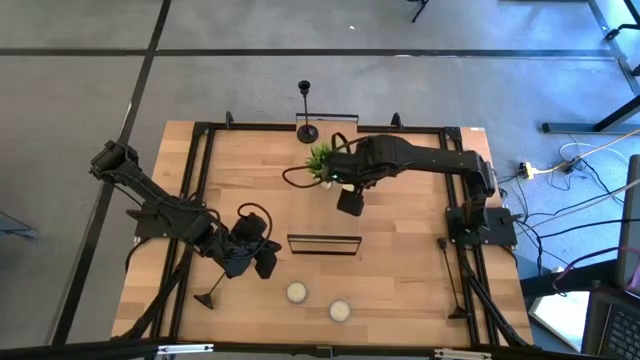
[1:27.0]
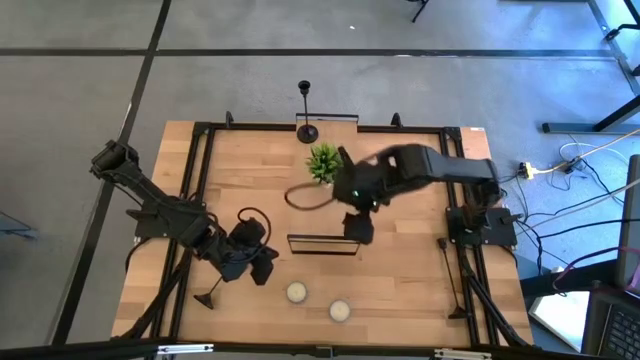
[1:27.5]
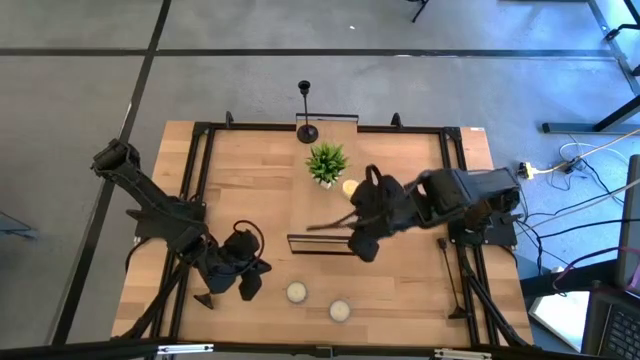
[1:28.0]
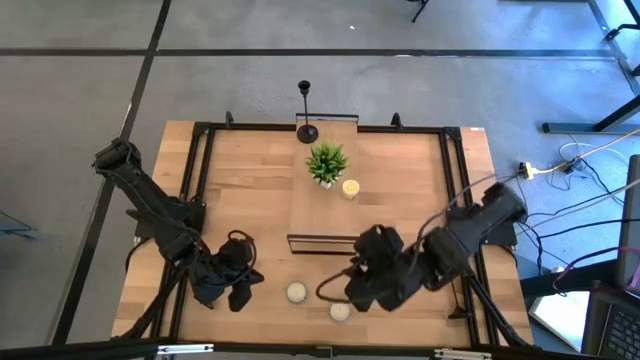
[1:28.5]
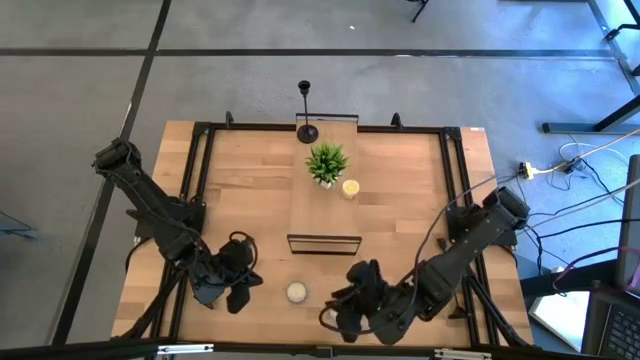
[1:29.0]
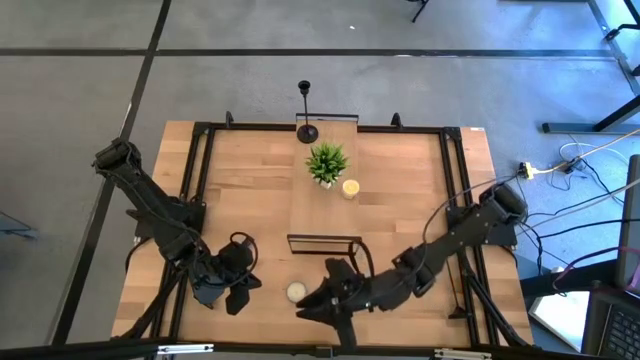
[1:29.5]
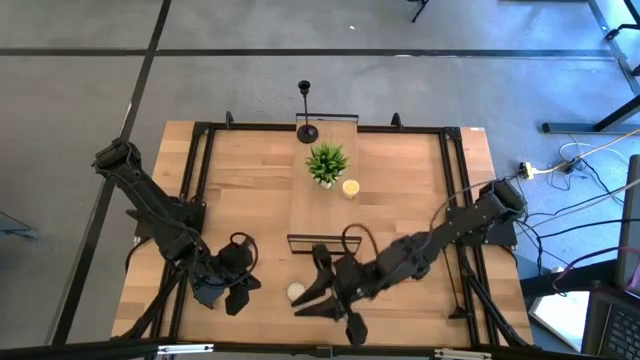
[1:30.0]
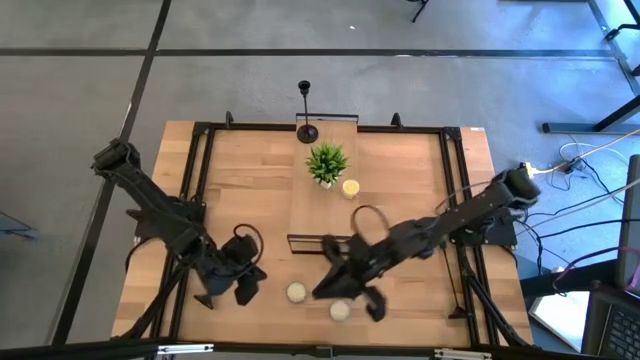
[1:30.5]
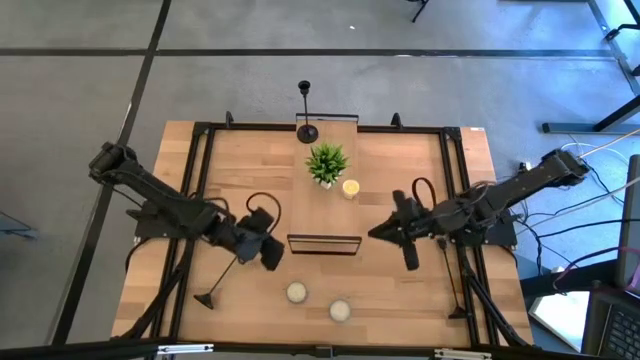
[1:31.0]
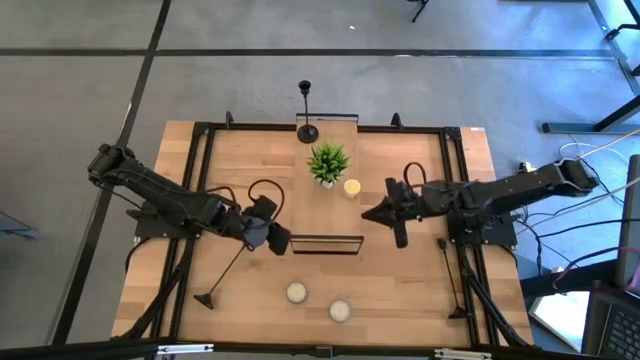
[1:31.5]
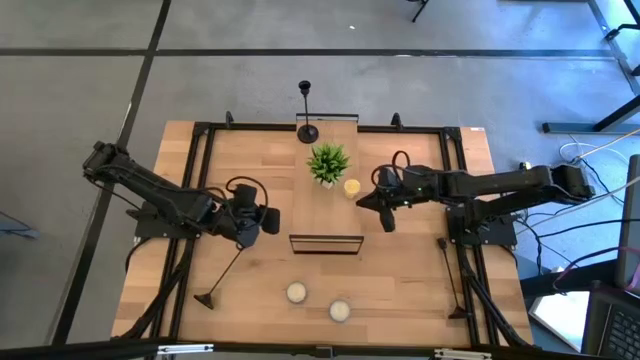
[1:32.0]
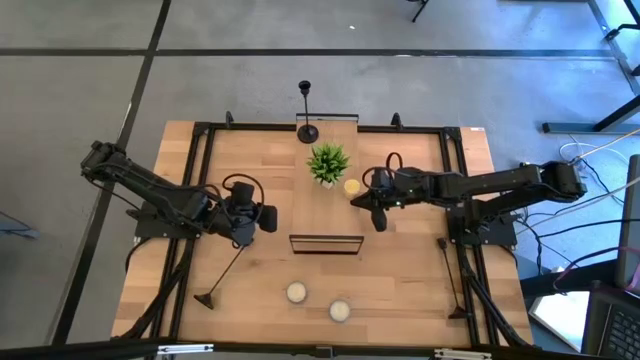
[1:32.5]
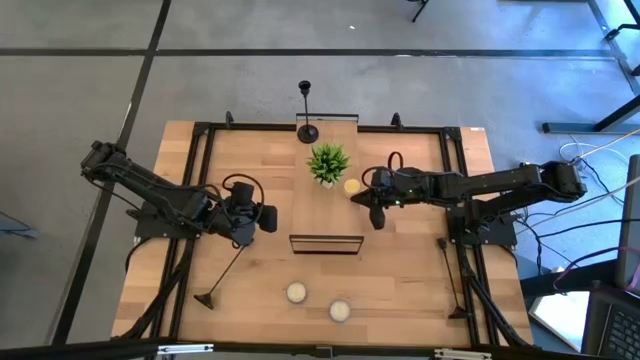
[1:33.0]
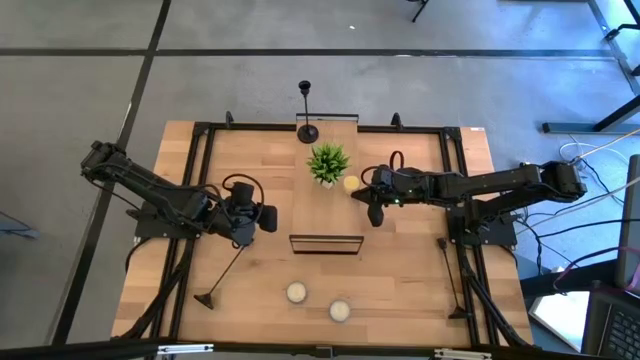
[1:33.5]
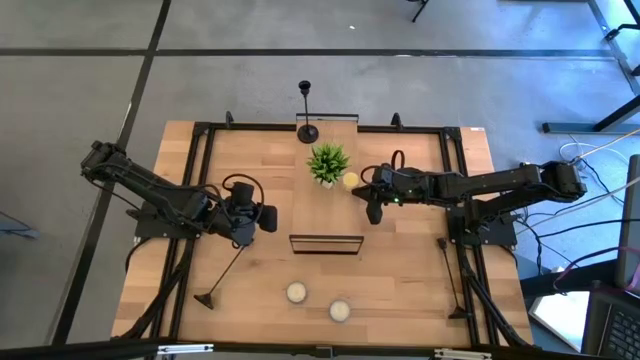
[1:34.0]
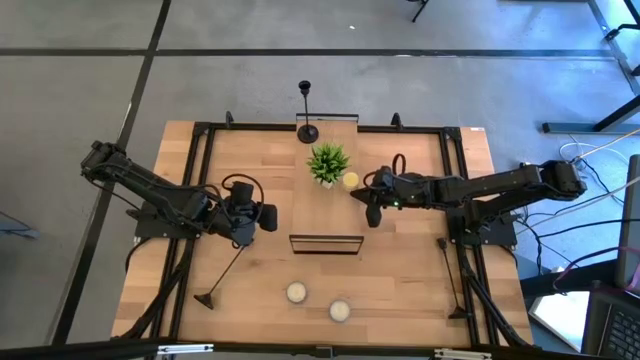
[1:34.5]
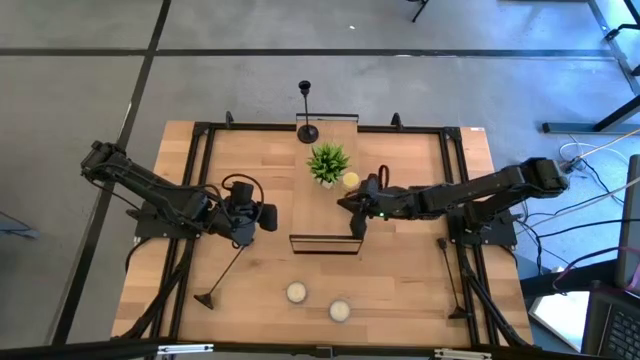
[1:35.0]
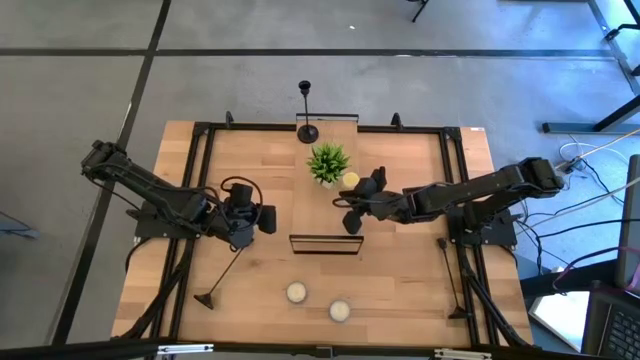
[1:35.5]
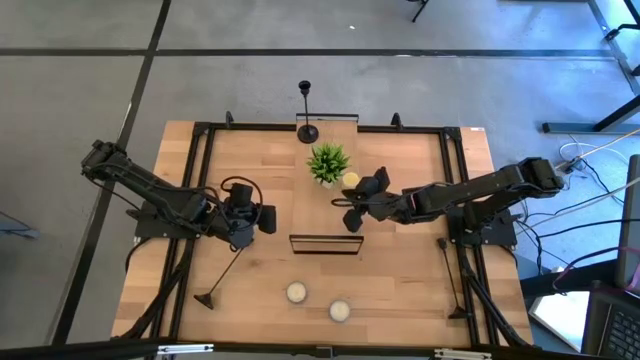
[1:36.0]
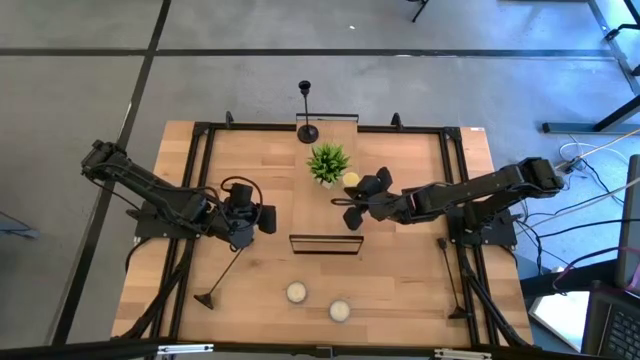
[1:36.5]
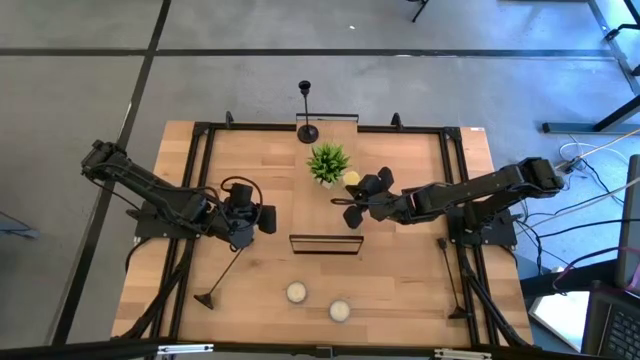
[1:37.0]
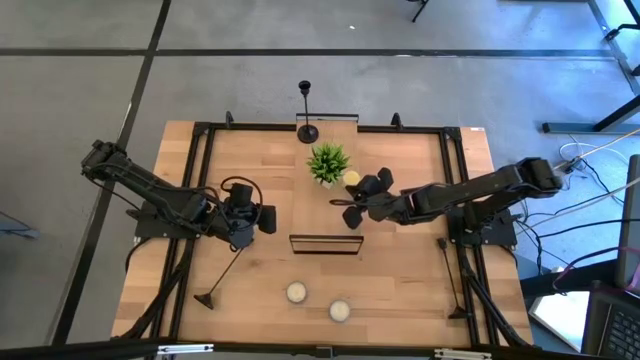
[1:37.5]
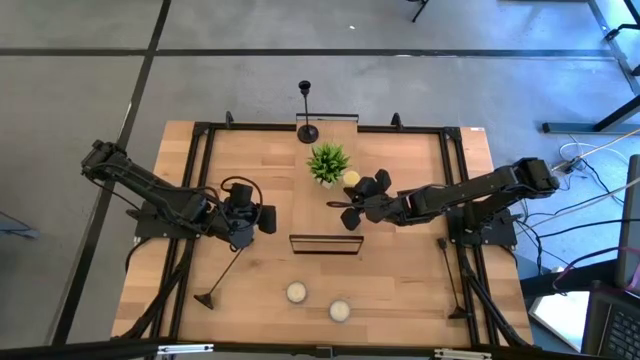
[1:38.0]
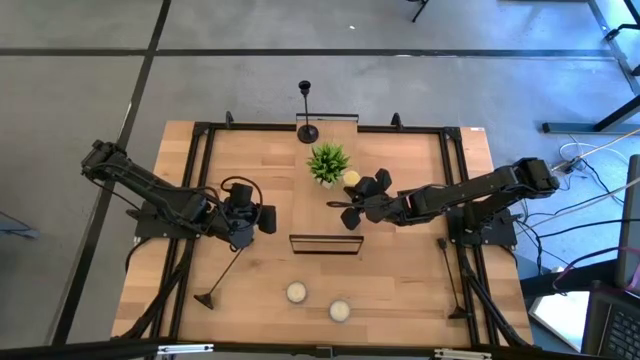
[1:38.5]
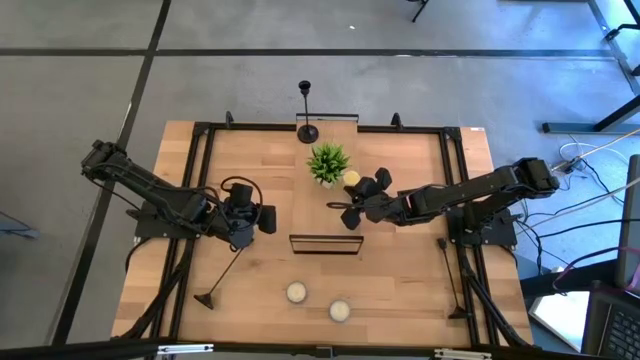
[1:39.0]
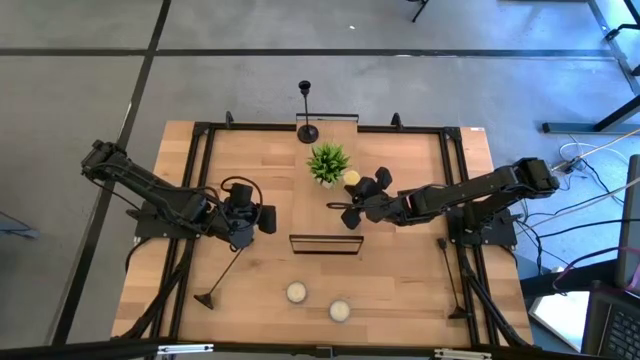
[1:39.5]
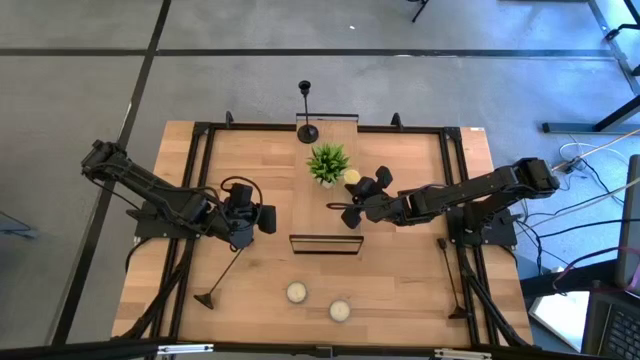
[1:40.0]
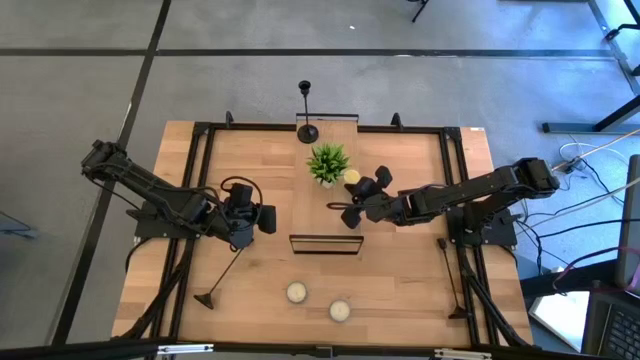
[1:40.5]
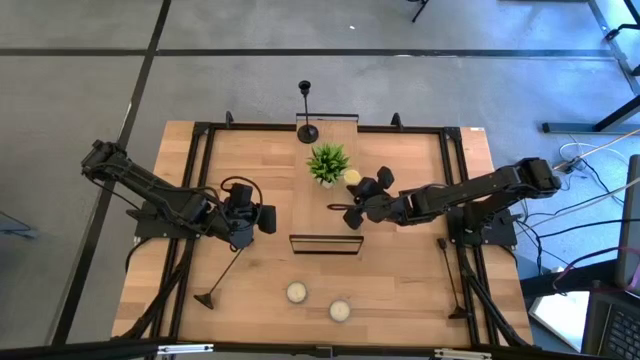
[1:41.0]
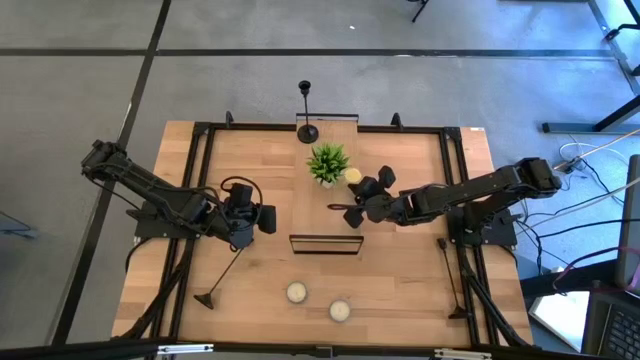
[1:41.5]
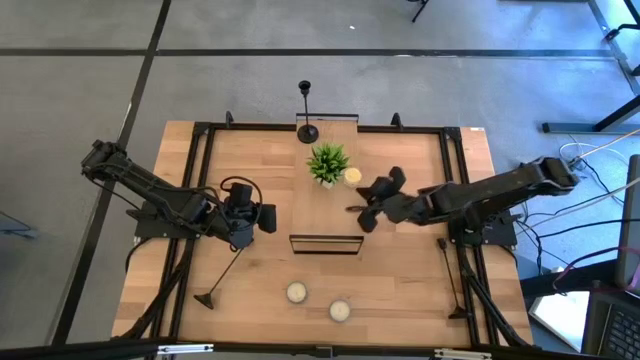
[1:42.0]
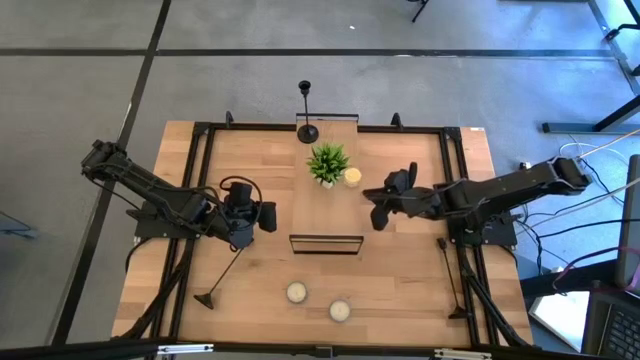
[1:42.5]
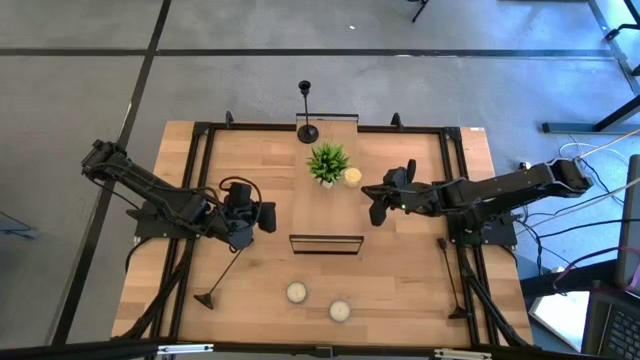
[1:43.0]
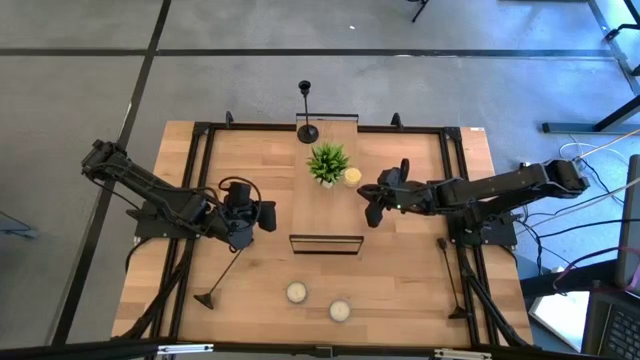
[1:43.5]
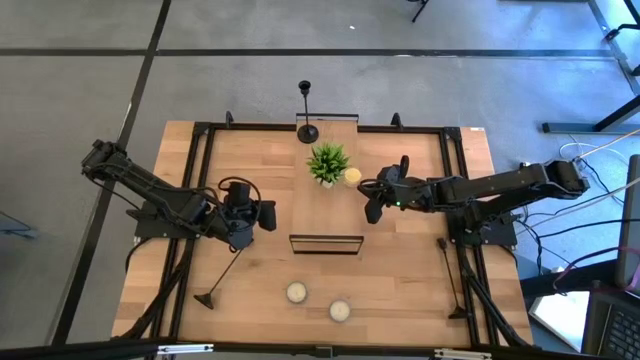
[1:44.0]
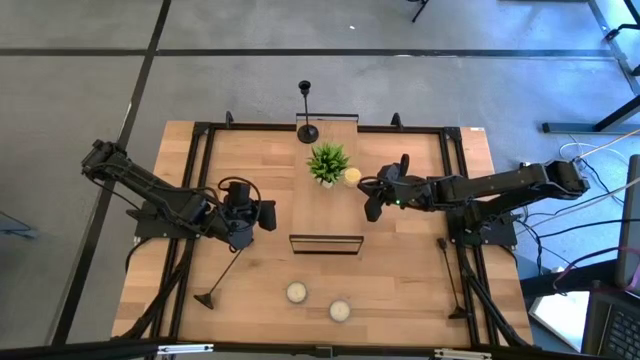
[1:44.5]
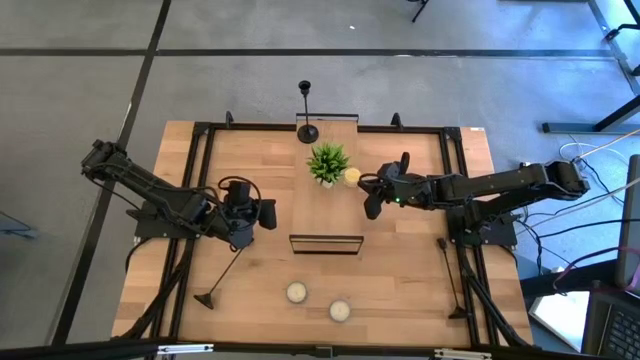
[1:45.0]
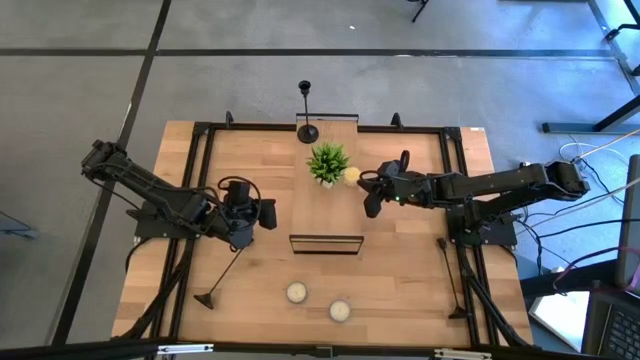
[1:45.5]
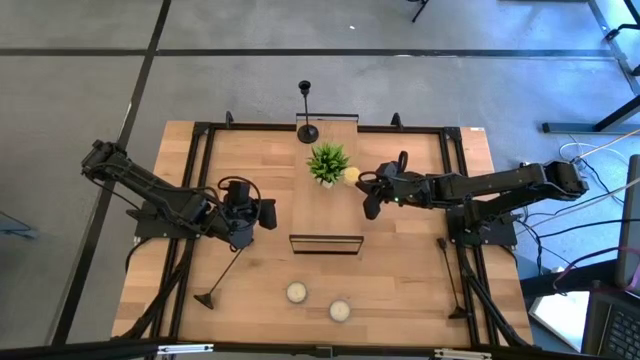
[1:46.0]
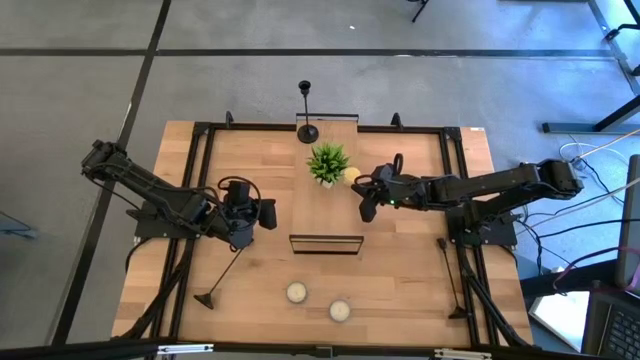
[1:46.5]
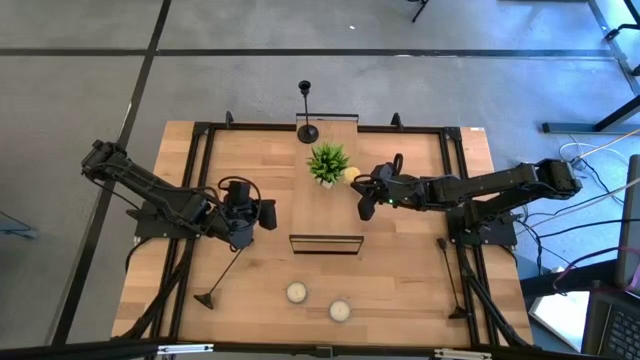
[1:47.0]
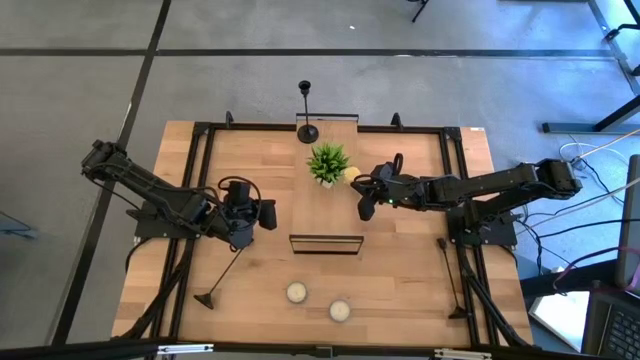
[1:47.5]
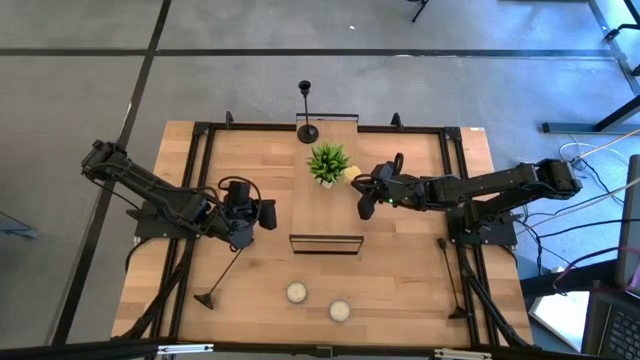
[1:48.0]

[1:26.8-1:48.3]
Task: Pick & Place candle stick holders
Put the transparent scented candle on the shelf
